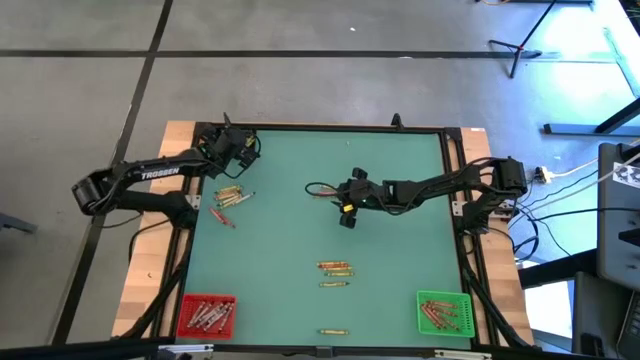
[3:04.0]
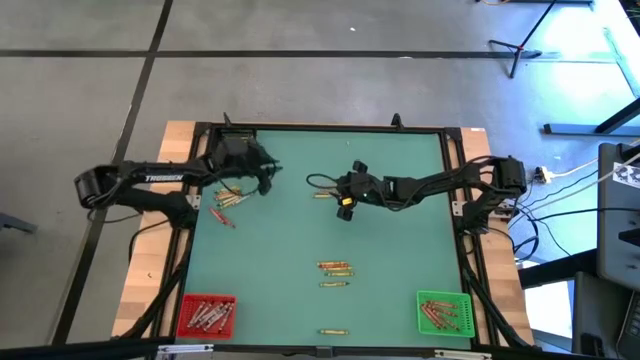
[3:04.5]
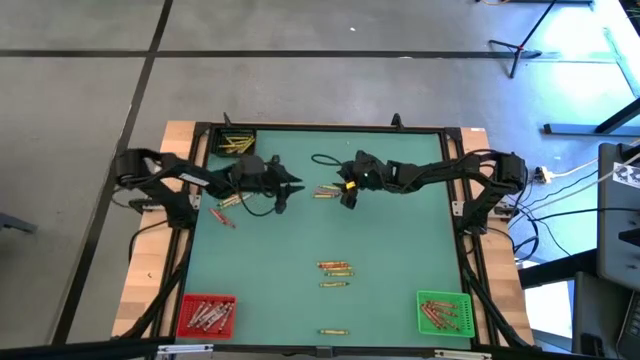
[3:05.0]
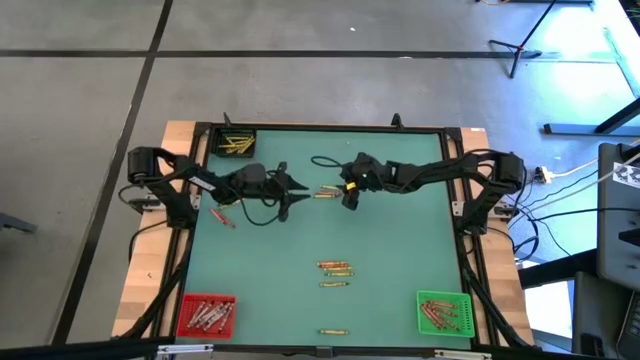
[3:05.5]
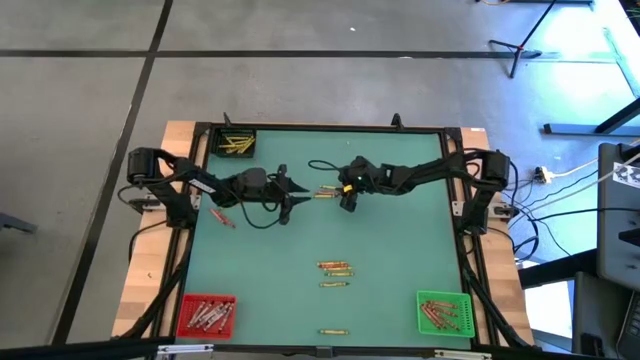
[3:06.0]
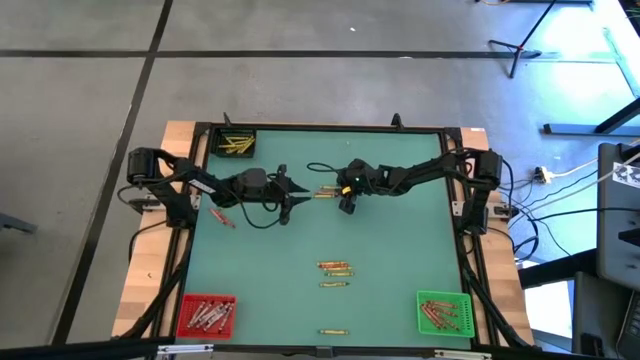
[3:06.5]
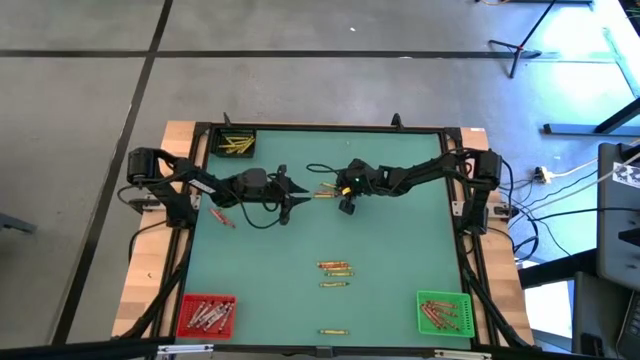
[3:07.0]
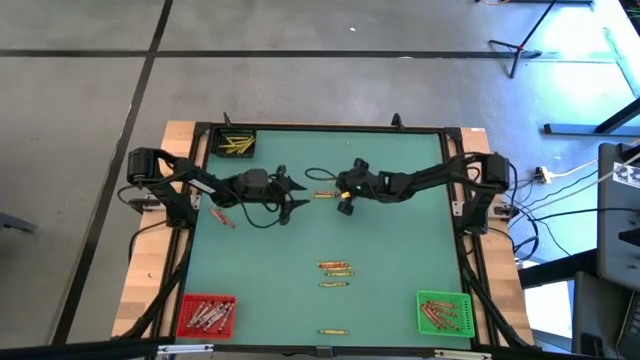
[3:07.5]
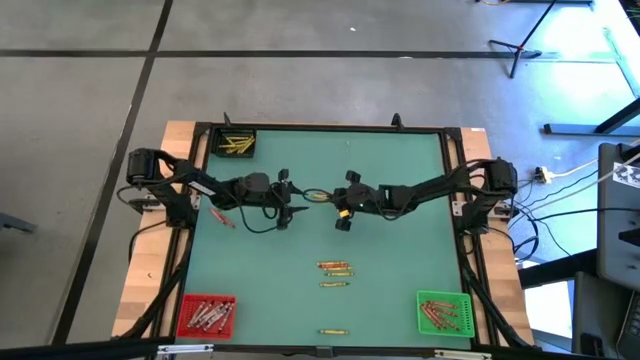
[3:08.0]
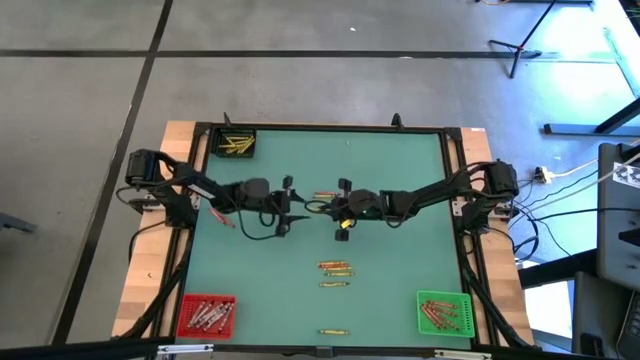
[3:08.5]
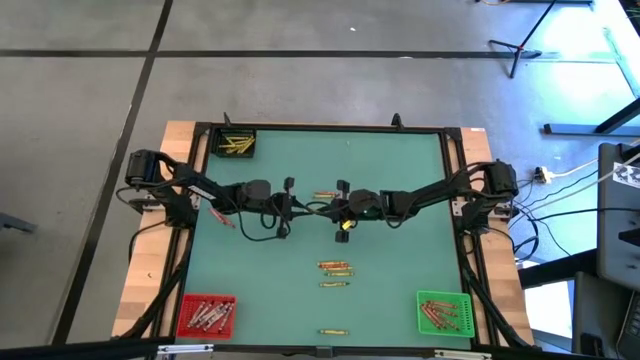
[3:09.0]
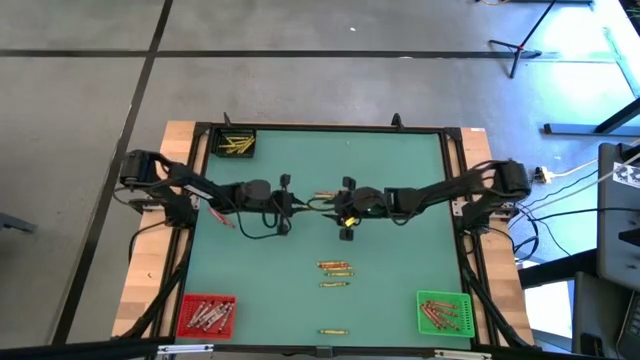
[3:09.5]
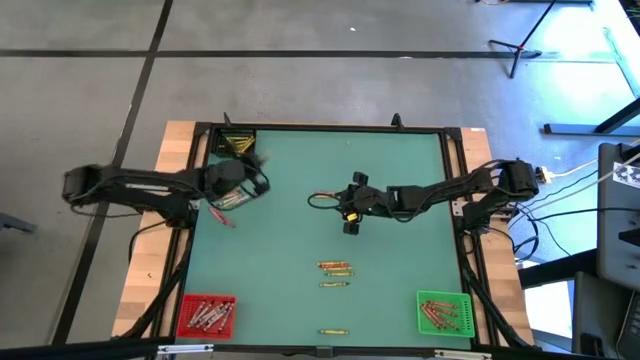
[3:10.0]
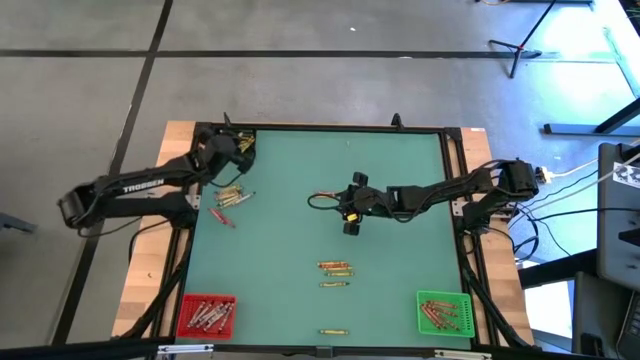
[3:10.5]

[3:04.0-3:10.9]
Task: Sort crayons
Put the green crayon into the black bin

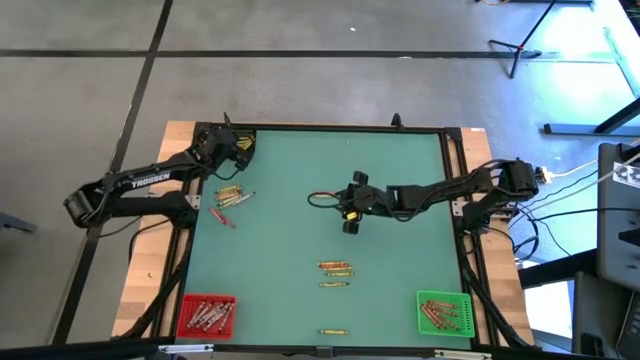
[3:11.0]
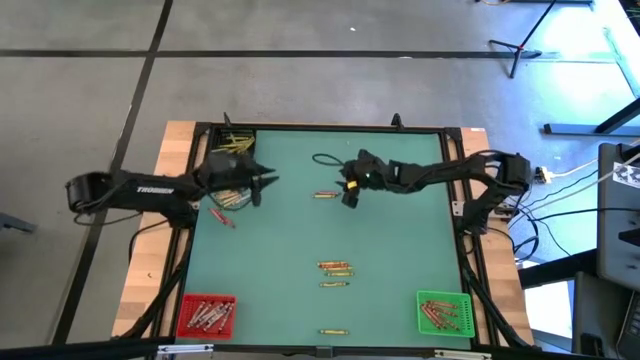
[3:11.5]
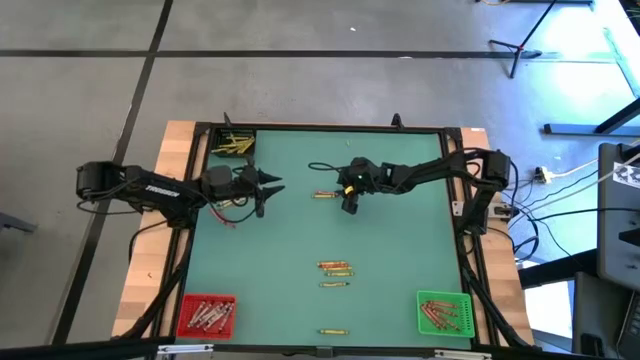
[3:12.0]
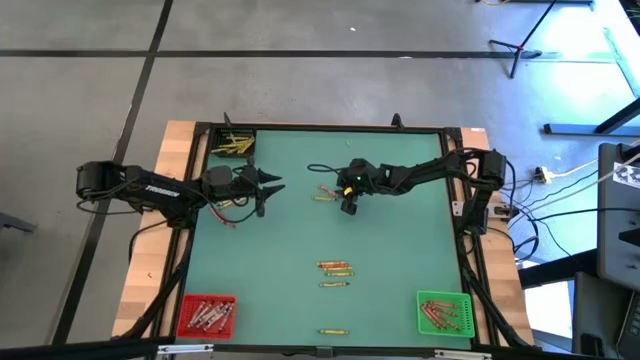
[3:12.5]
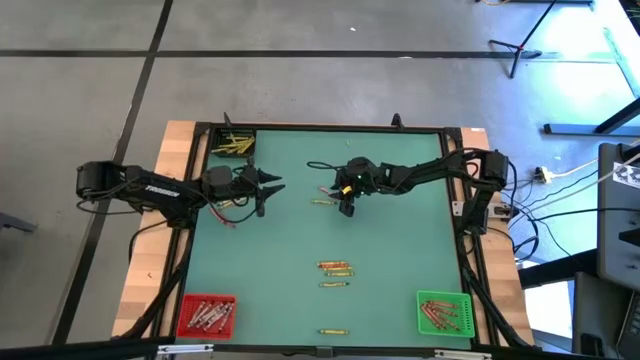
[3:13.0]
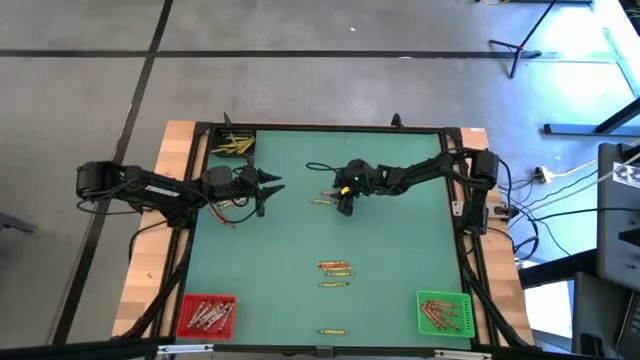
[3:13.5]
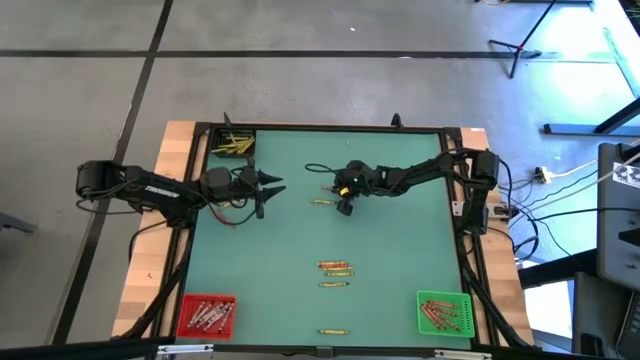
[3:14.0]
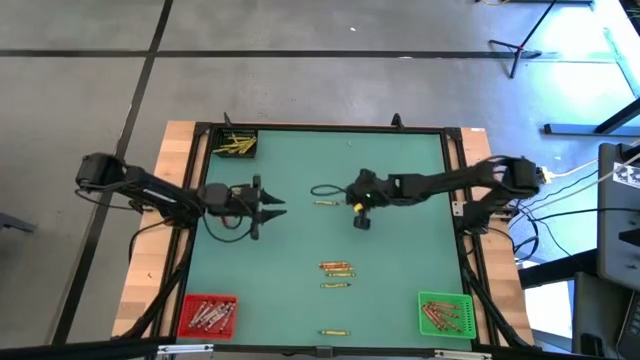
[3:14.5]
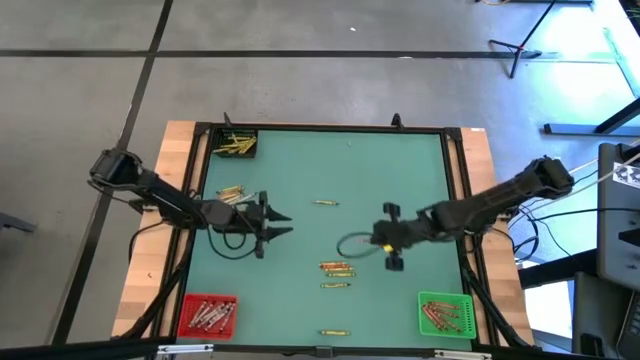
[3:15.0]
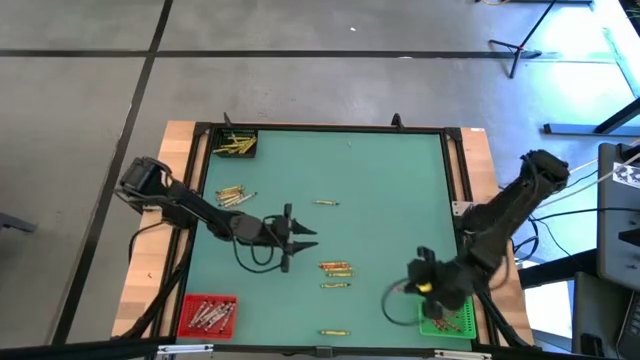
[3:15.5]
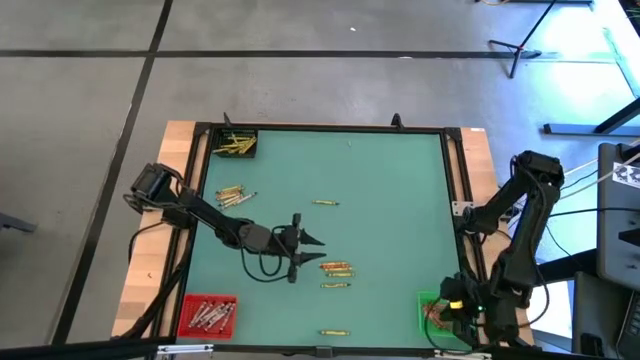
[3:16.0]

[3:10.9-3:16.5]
Put the red crayon into the green bin

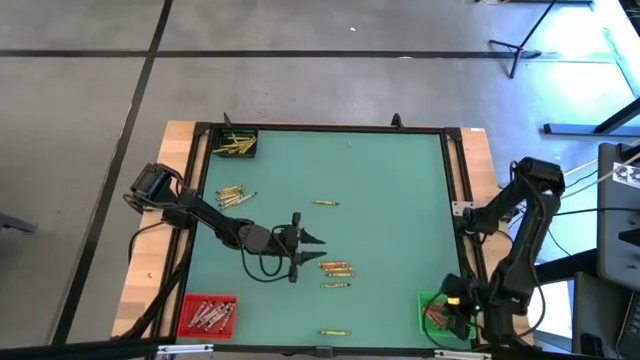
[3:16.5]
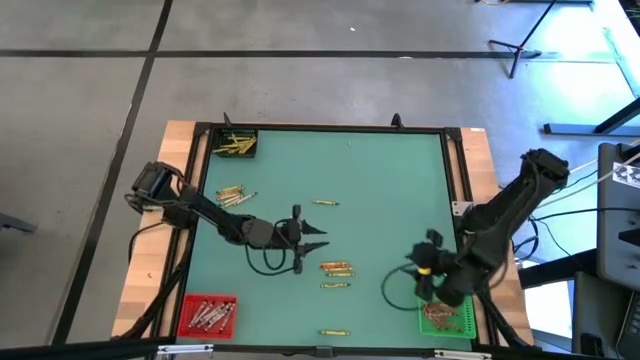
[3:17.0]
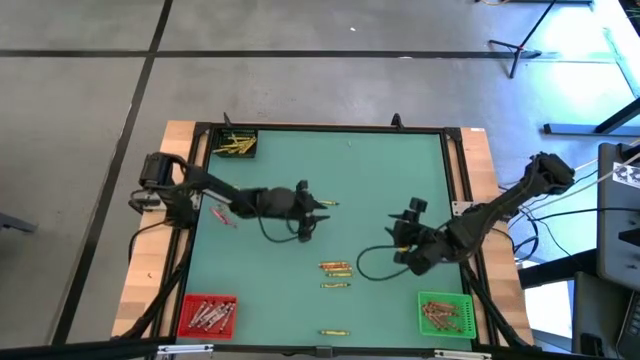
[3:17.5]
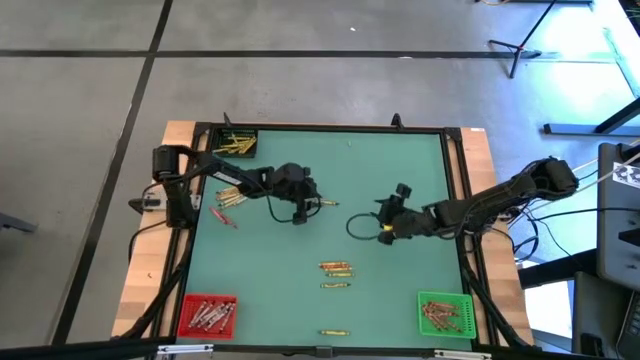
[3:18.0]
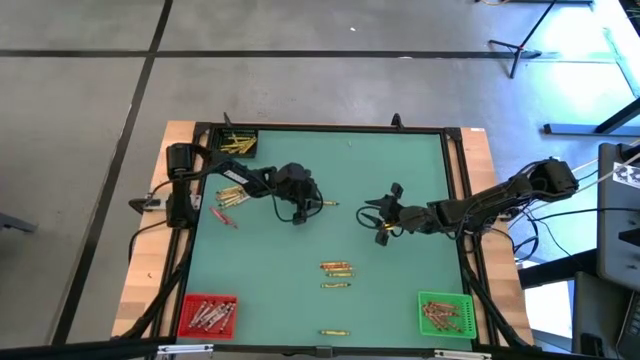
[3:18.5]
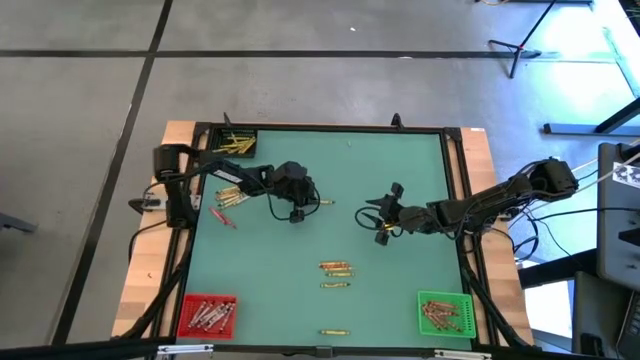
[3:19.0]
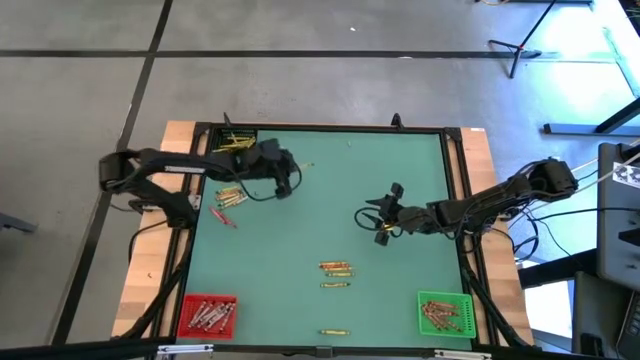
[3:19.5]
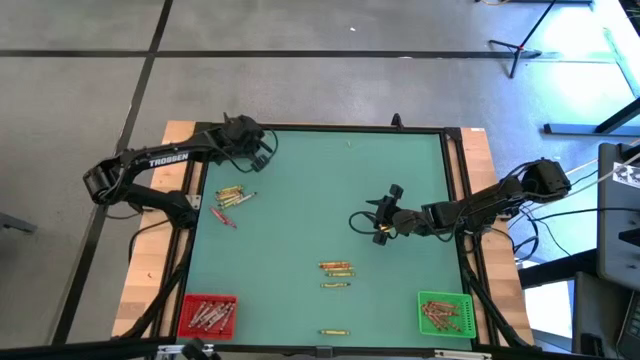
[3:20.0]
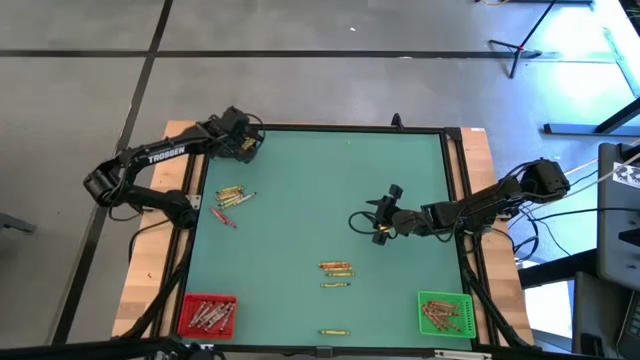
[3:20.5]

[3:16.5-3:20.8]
Put the green crayon into the black bin

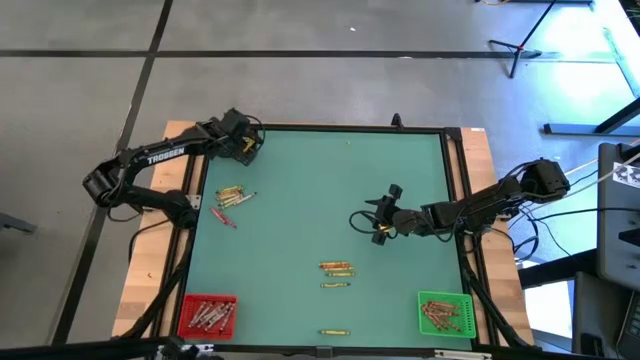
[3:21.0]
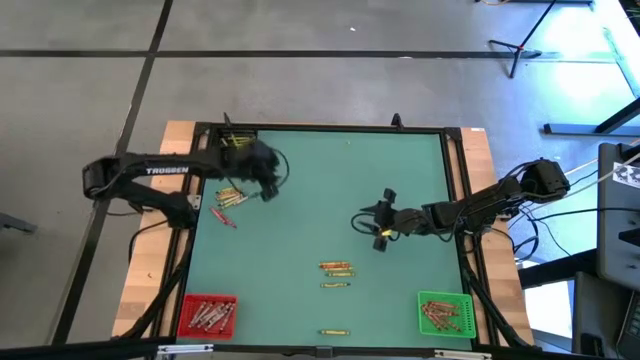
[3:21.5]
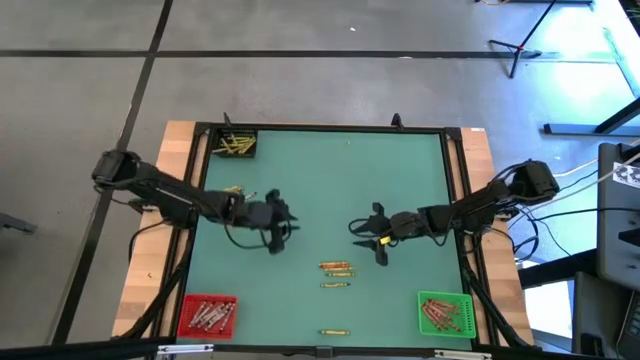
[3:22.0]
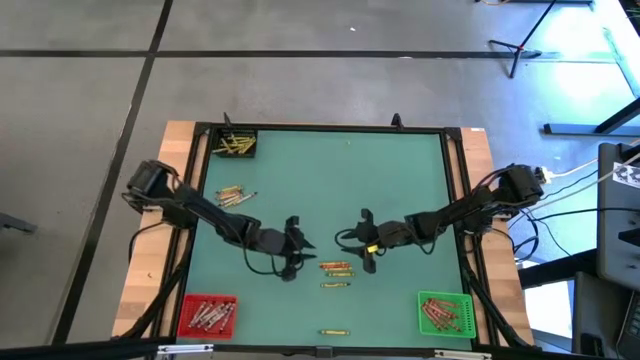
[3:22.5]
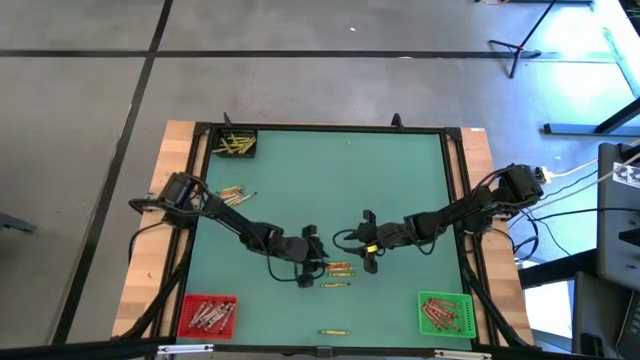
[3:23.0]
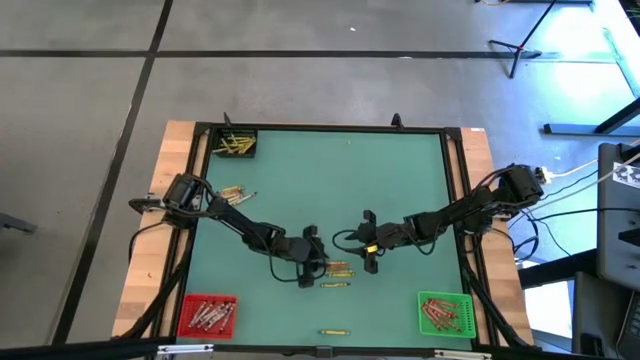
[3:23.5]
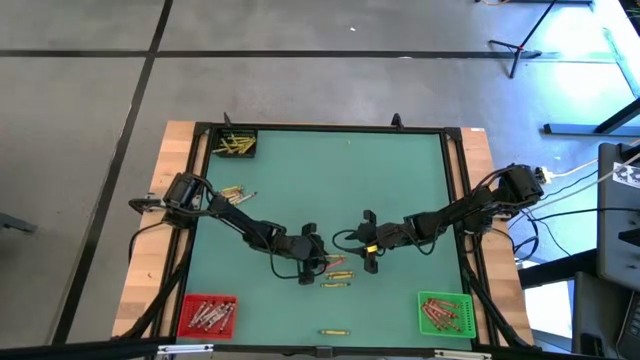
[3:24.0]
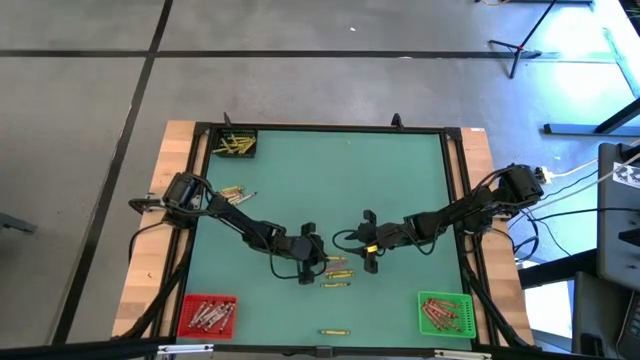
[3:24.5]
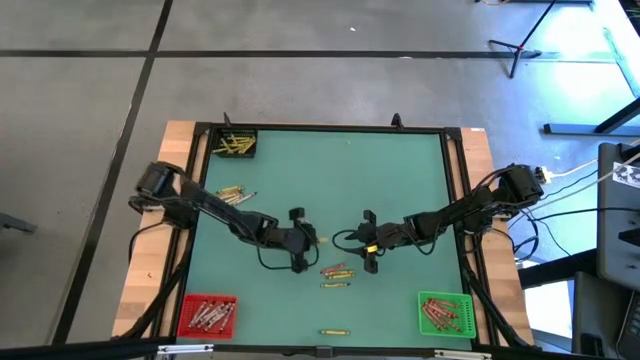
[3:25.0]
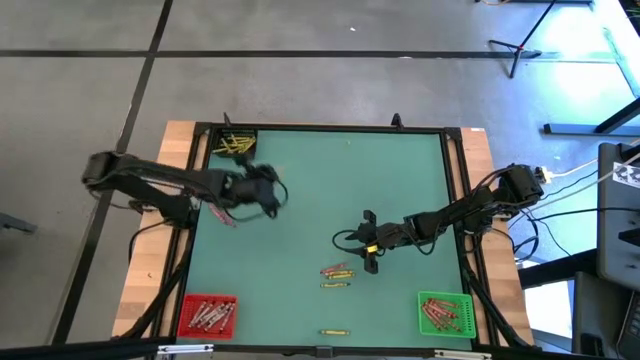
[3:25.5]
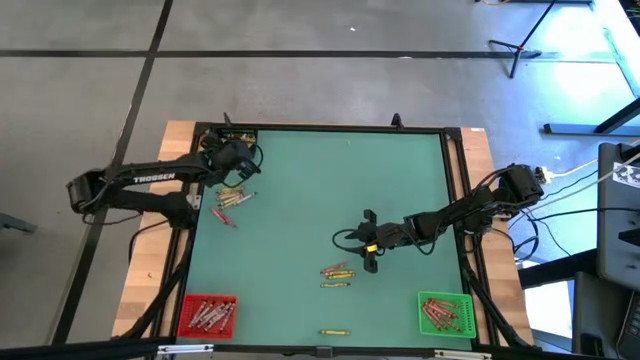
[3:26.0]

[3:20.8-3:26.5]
Put the middle yellow crayon into the black bin
